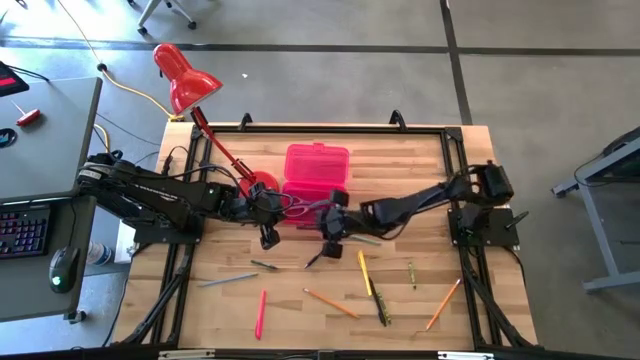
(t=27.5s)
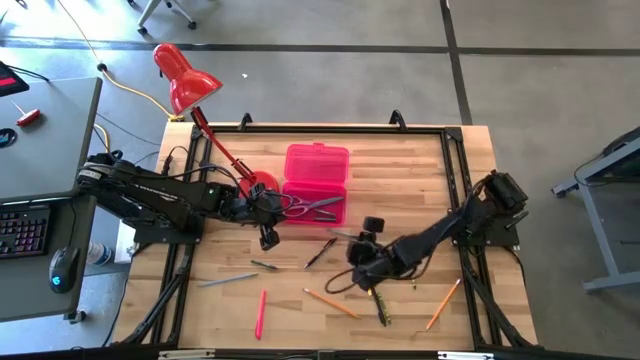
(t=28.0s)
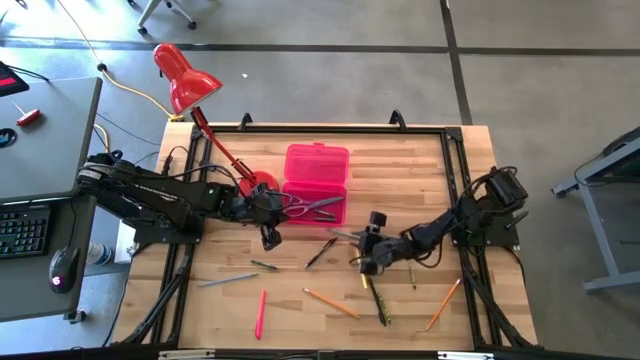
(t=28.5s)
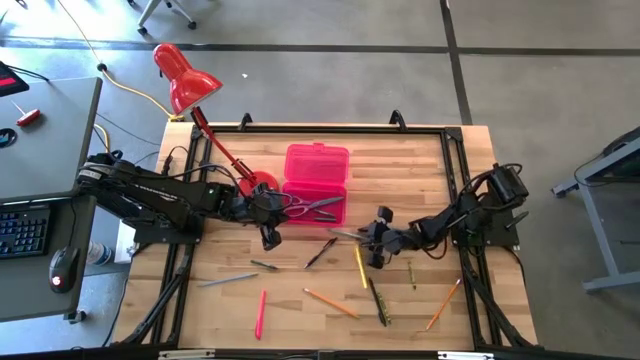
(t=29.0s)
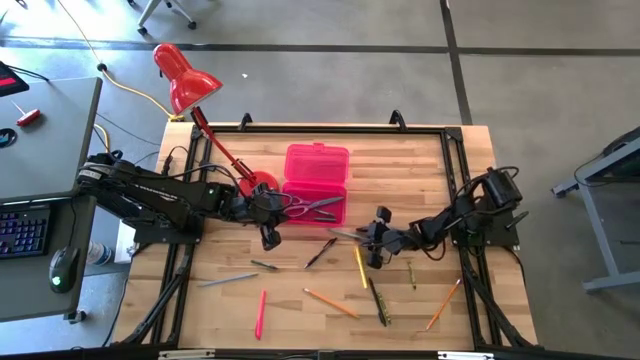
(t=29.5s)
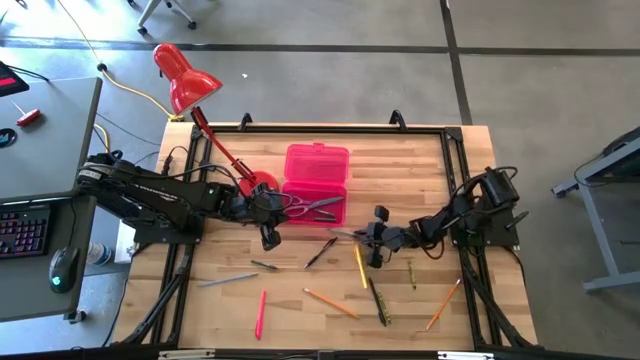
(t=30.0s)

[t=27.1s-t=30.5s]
Task: Pick & place school supplies into a supply box
Put the light green pencil into the pink supply box

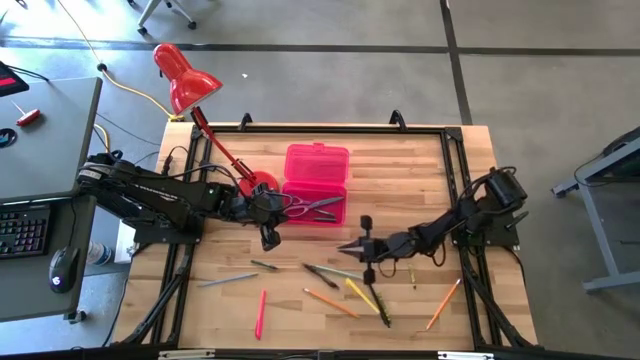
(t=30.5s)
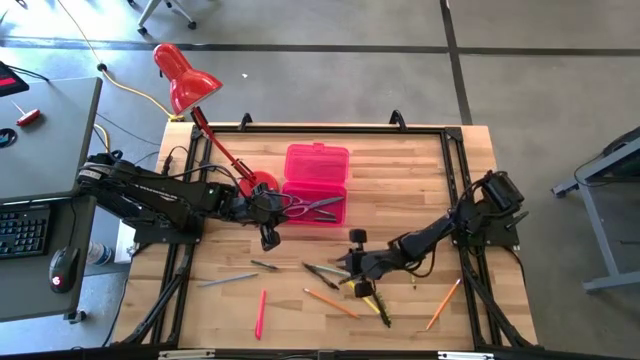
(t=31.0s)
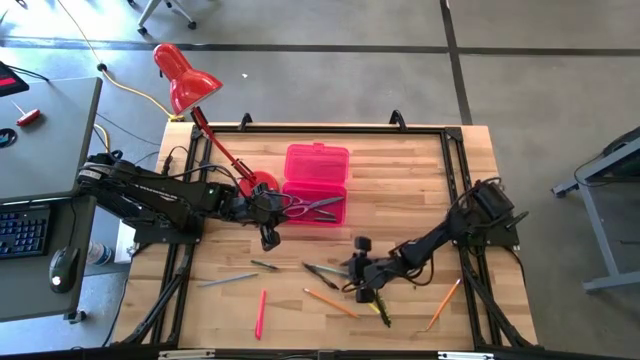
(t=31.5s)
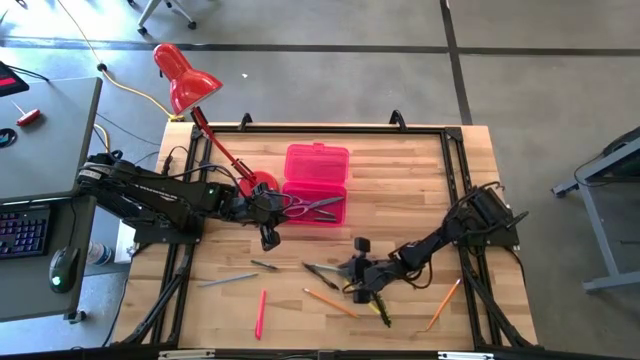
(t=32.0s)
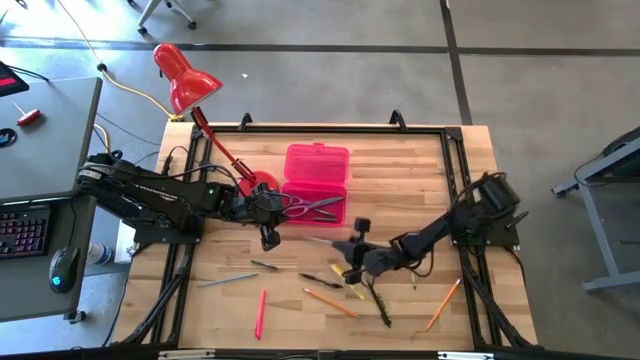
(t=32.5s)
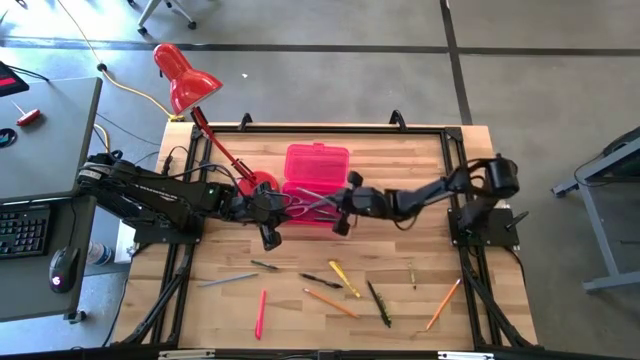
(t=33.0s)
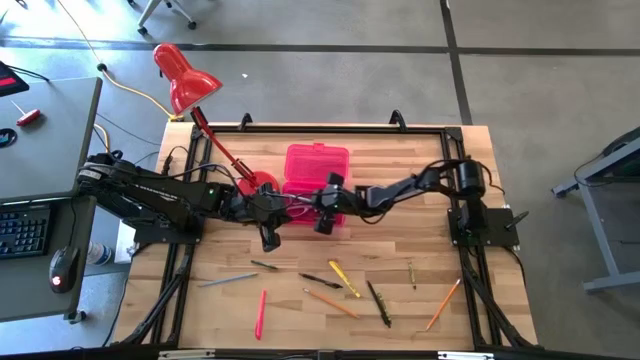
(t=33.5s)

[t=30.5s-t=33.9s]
Put the light green pencil into the pink supply box

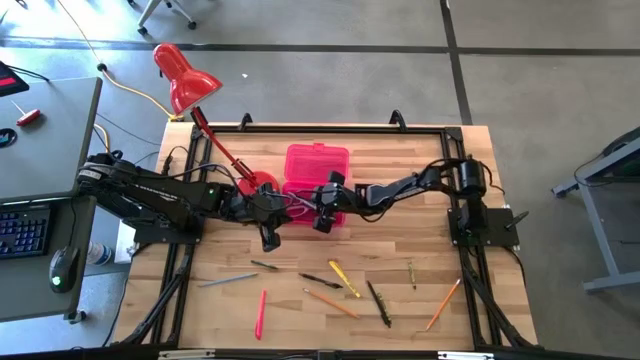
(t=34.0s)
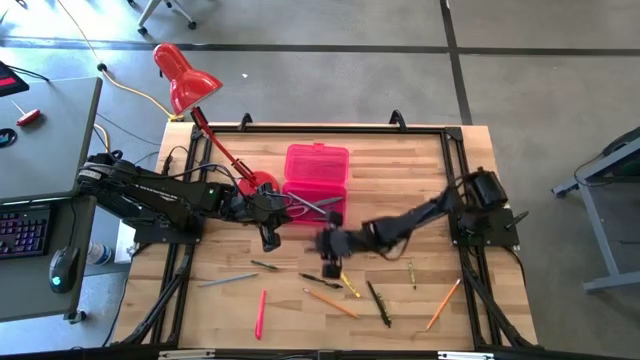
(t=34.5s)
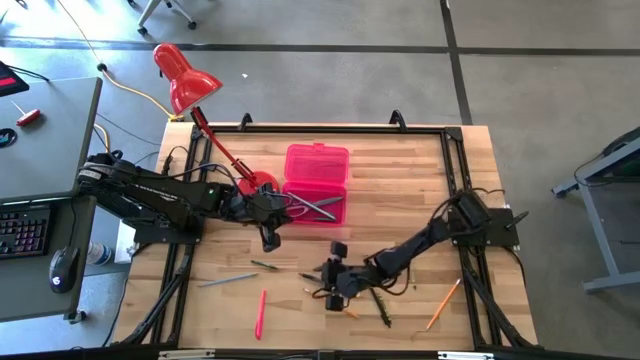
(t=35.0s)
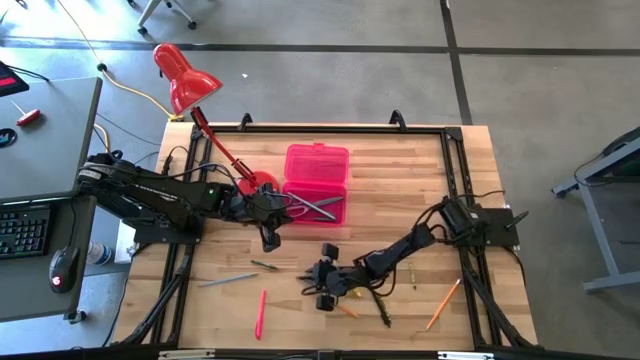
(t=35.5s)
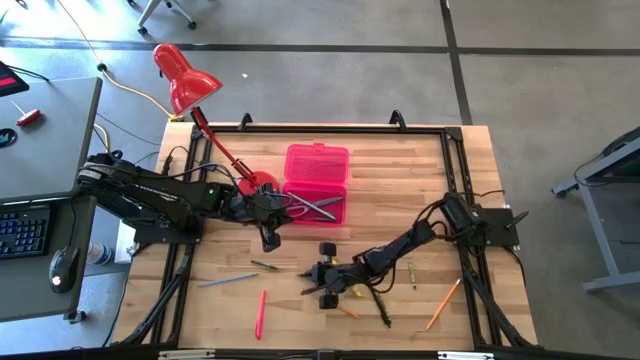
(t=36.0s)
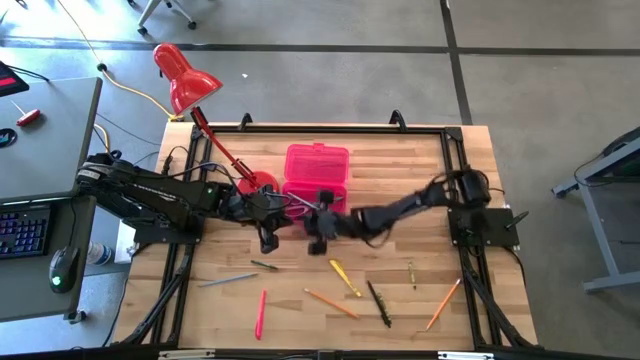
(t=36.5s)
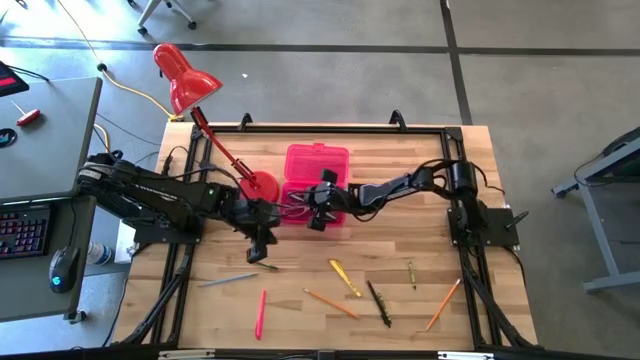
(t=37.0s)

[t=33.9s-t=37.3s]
Put the left black pen into the pink supply box

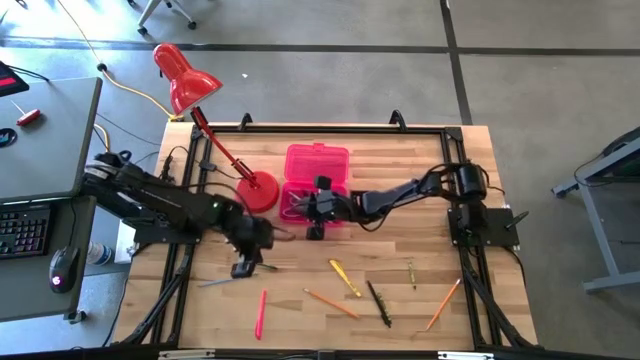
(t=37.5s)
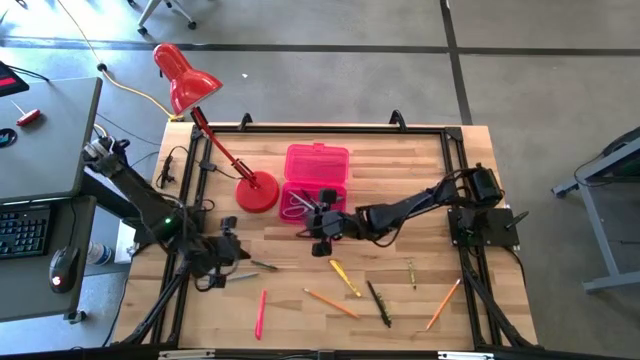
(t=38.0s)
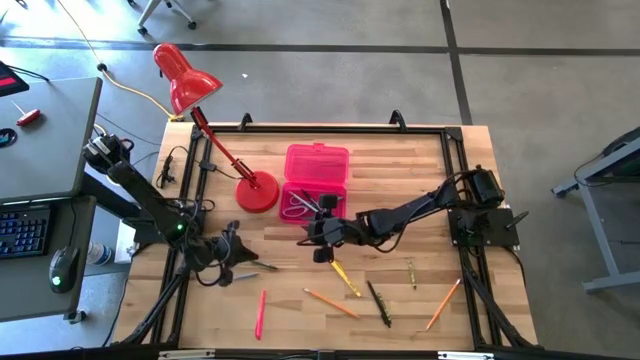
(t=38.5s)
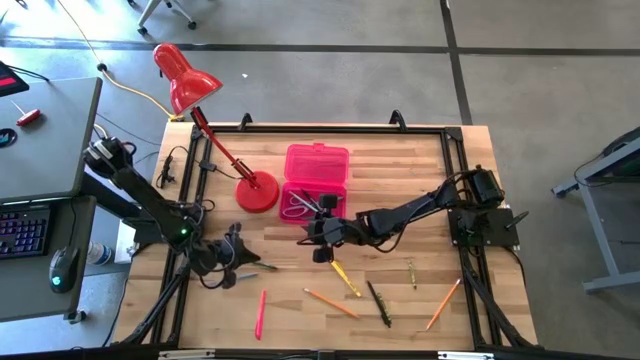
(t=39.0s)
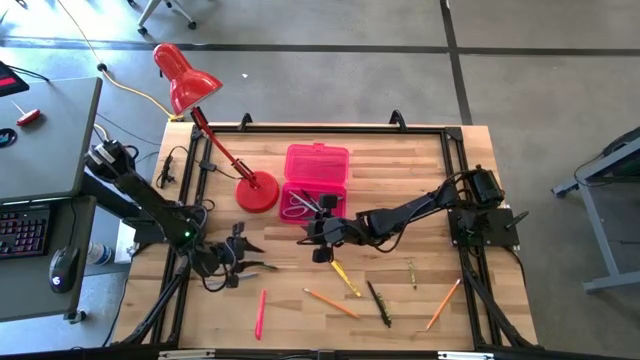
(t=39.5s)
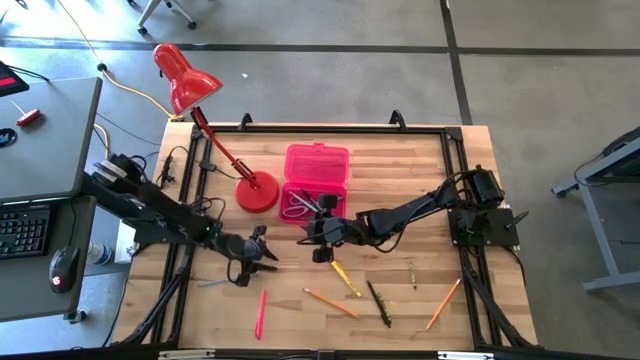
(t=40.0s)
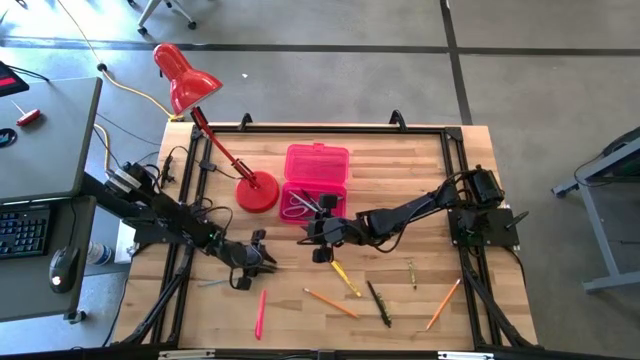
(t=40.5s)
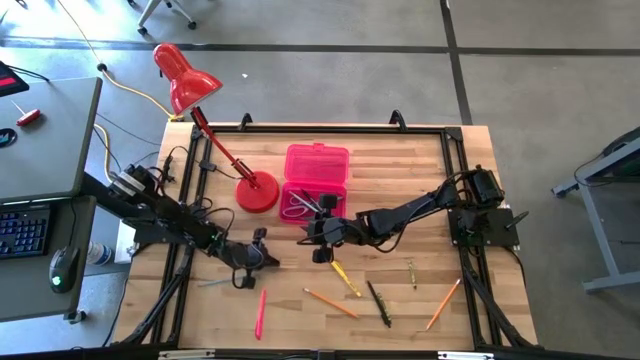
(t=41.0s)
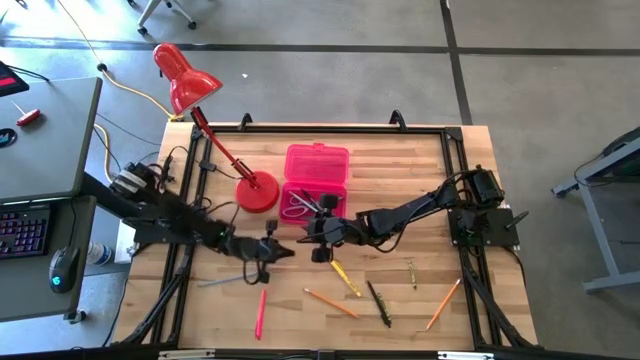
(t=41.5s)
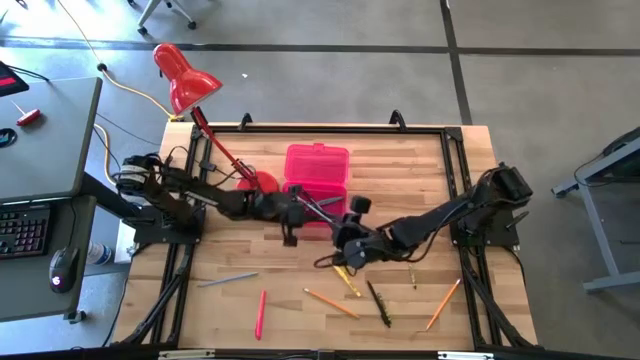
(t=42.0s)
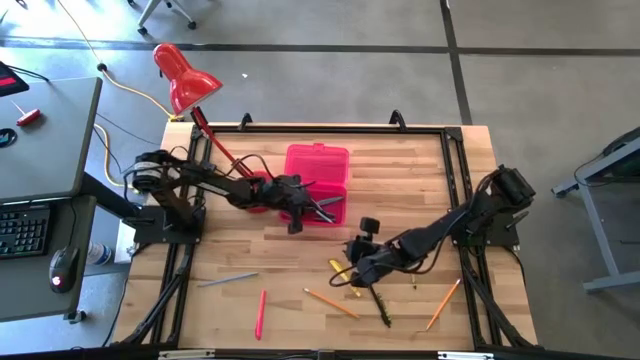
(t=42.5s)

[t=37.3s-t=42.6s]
Put the green crayon into the pink supply box

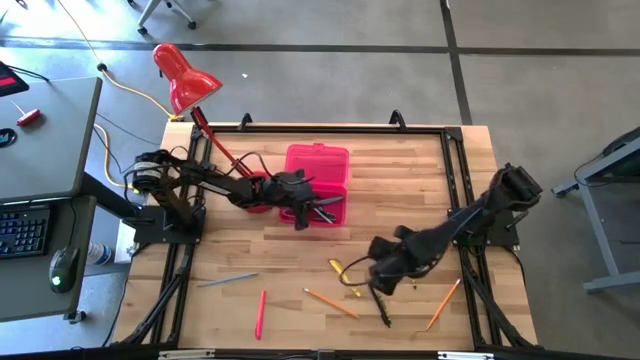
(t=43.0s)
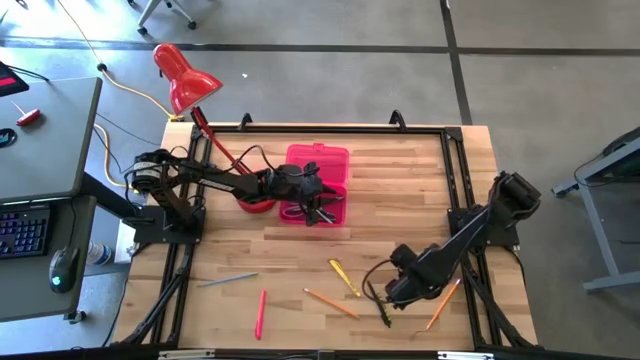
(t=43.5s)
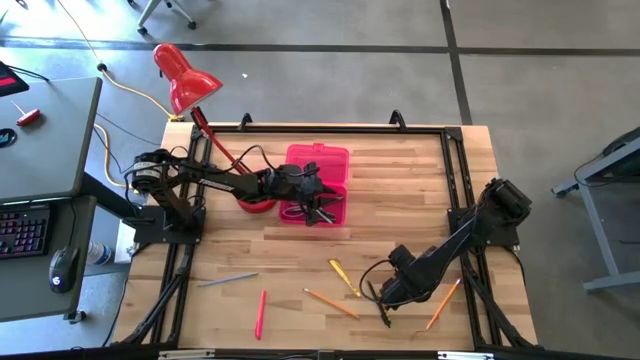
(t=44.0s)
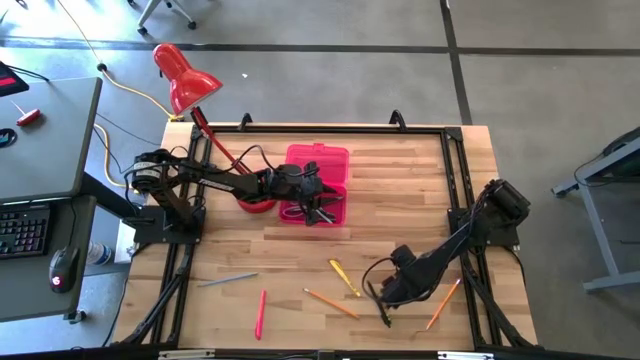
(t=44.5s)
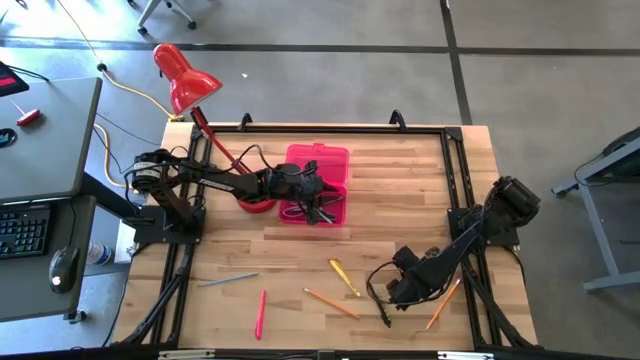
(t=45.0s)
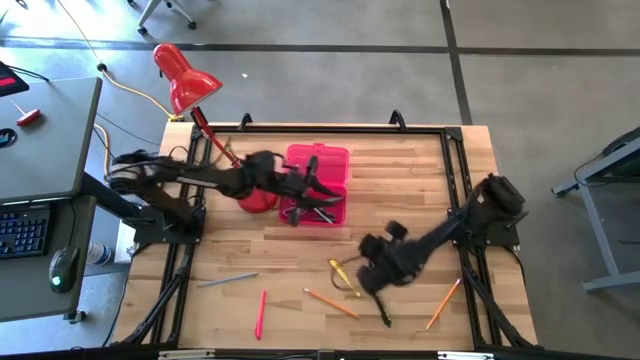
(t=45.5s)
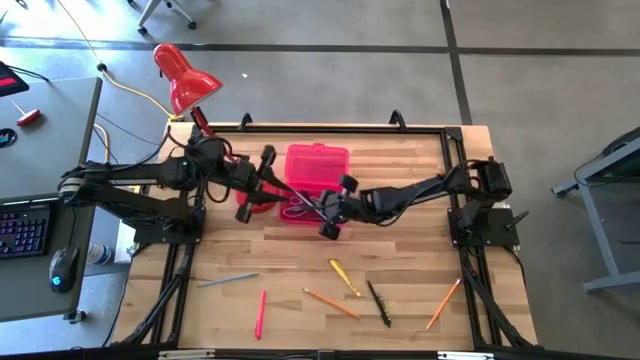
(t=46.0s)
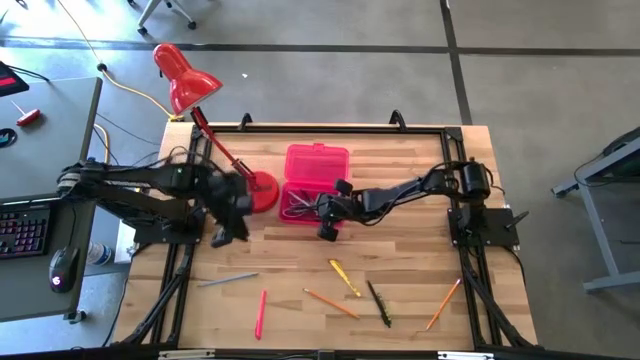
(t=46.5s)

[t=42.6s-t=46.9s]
Put the top yellow crayon into the pink supply box

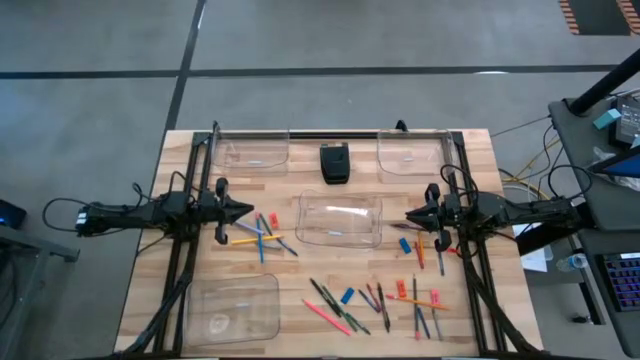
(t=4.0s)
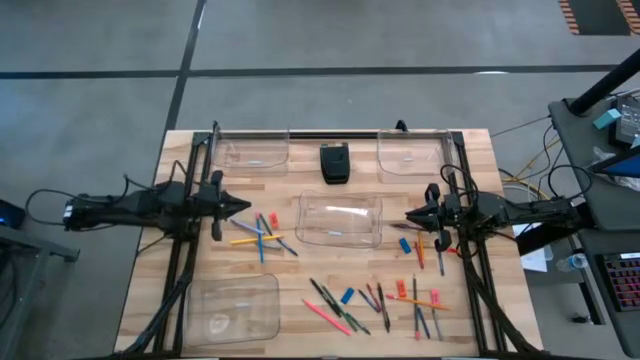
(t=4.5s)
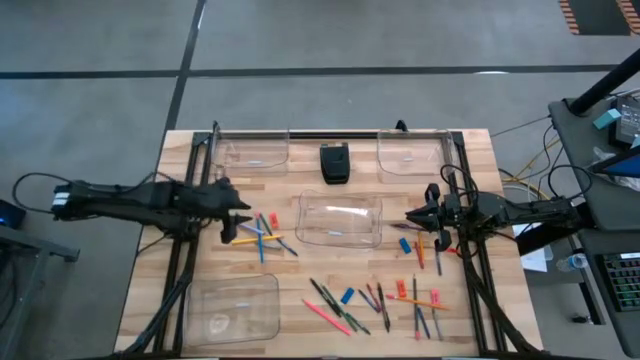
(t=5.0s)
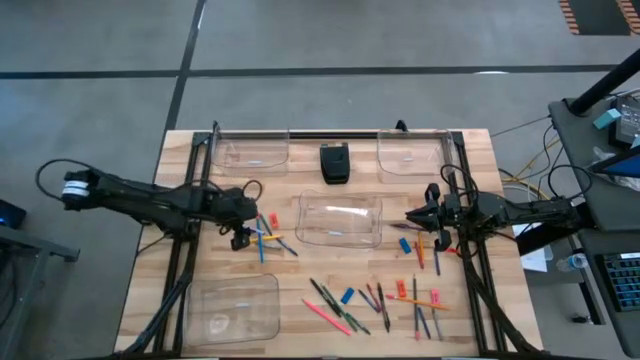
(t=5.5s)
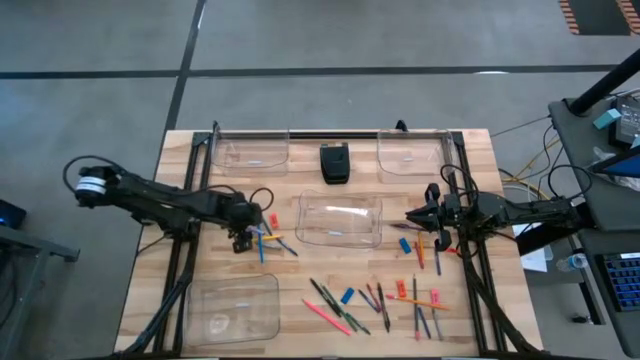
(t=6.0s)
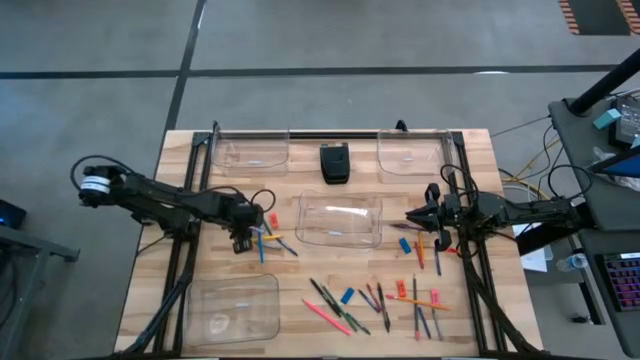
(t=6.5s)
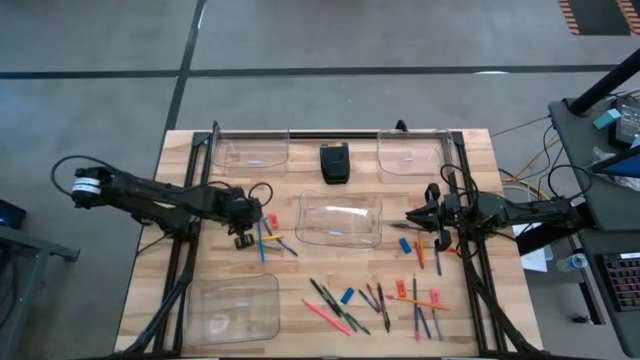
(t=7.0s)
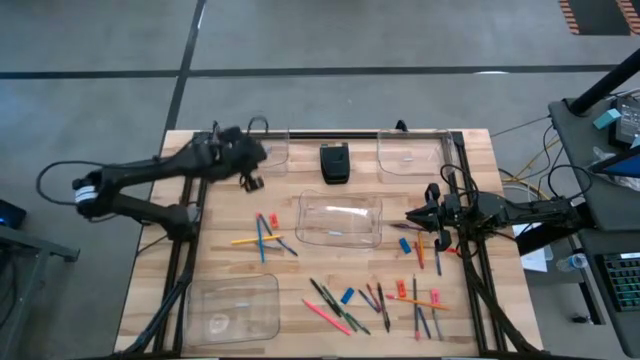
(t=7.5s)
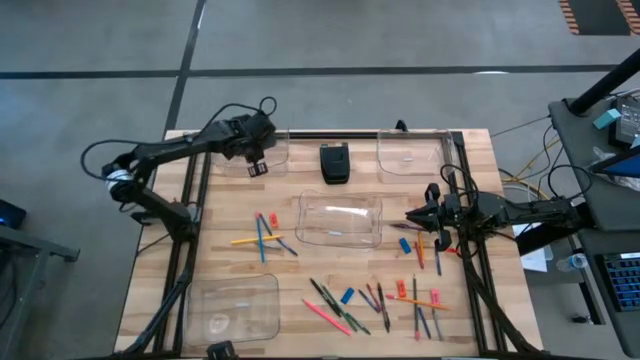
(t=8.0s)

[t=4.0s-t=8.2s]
Task: Sort crayons/erasers/pens/pencils in bins
Put the gray pen into the top left transparent bin
